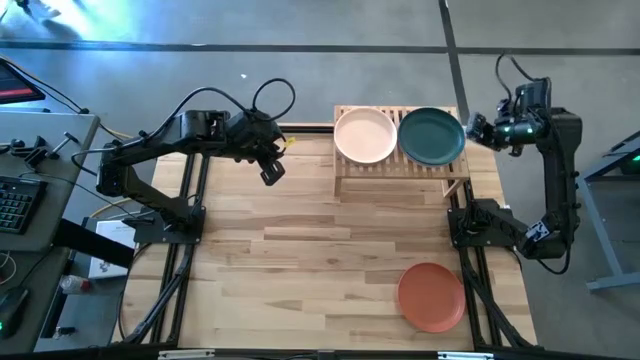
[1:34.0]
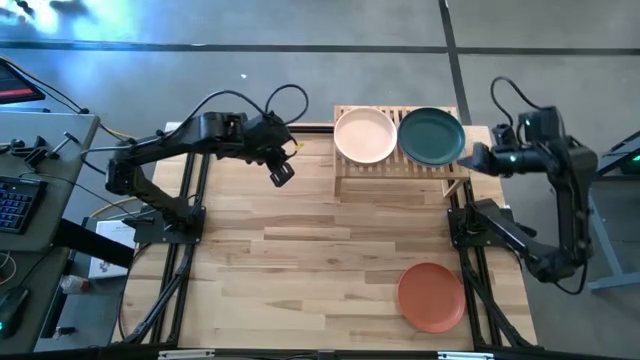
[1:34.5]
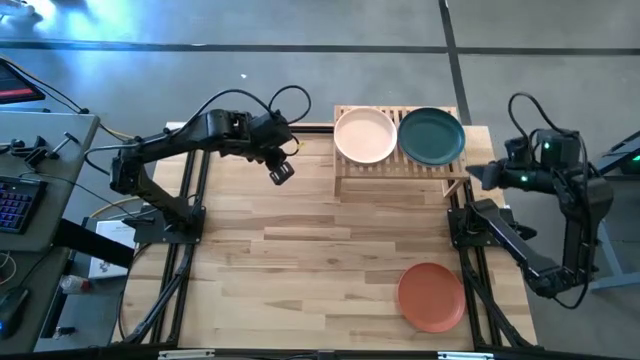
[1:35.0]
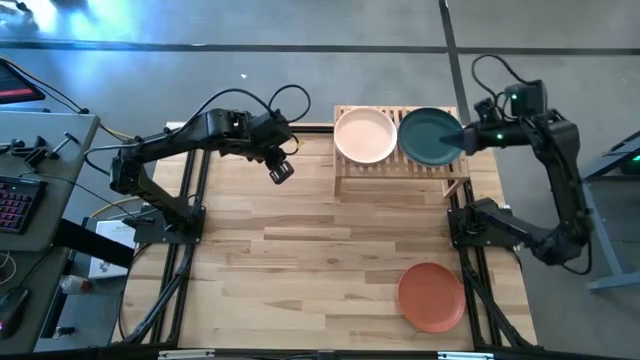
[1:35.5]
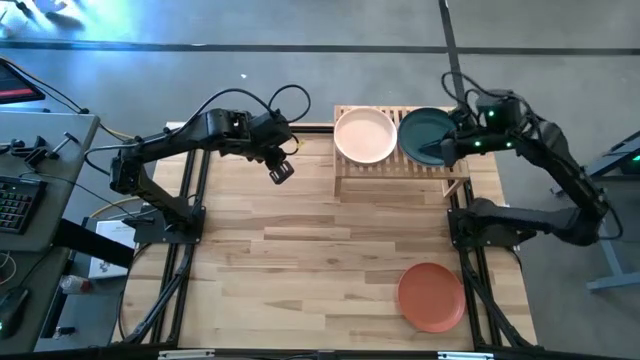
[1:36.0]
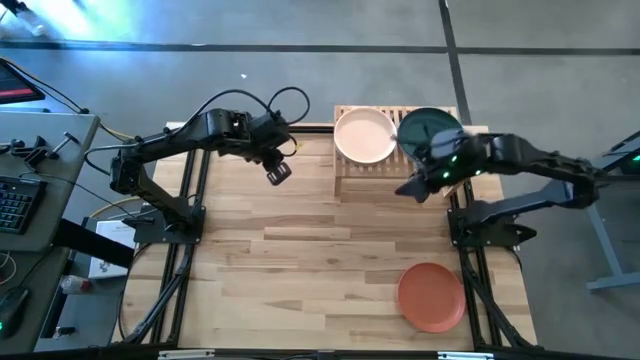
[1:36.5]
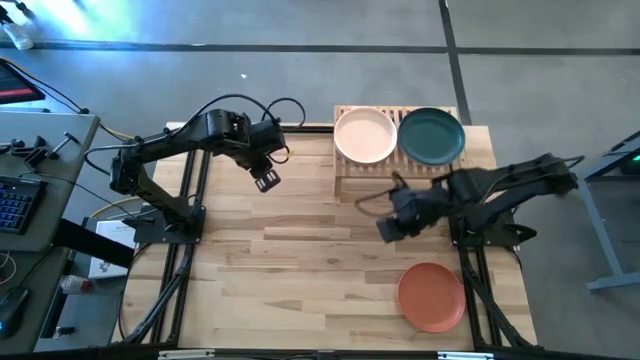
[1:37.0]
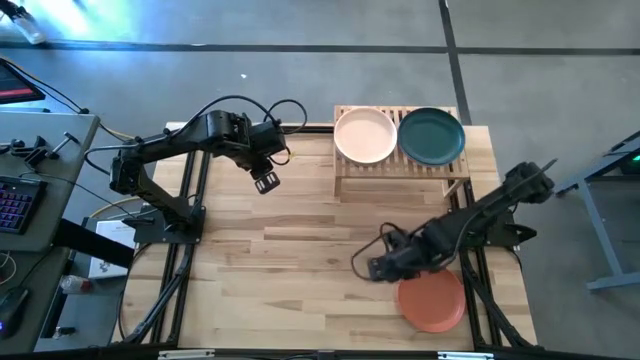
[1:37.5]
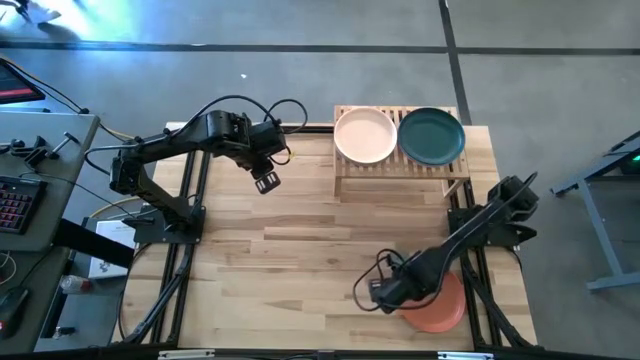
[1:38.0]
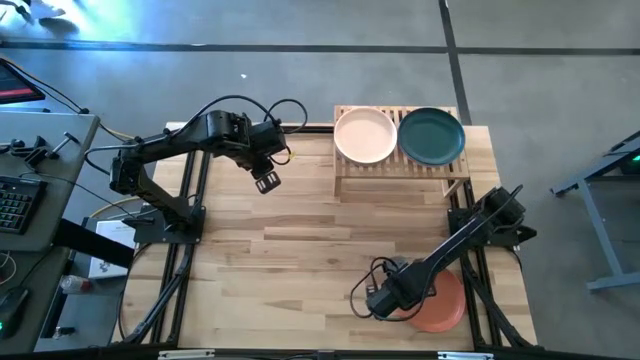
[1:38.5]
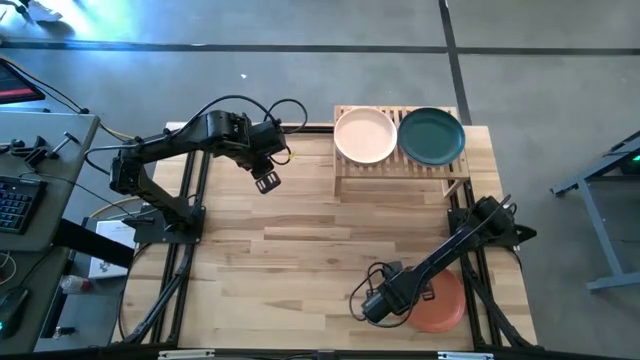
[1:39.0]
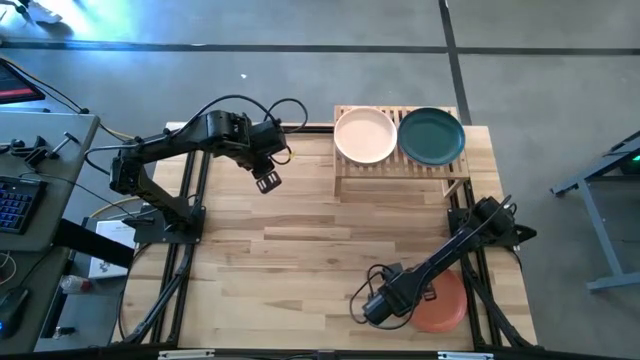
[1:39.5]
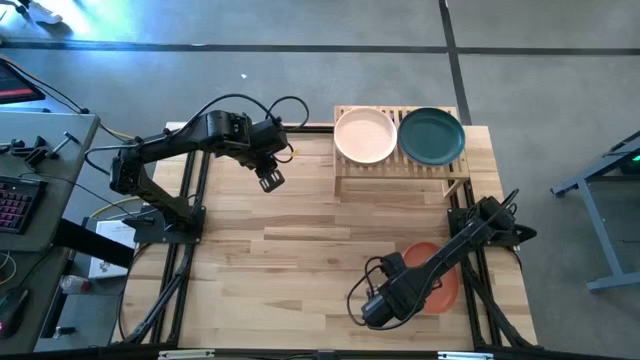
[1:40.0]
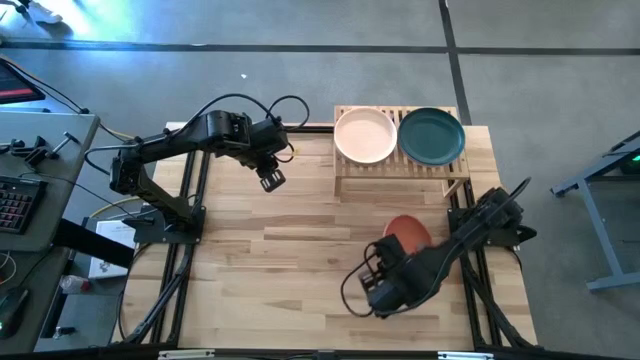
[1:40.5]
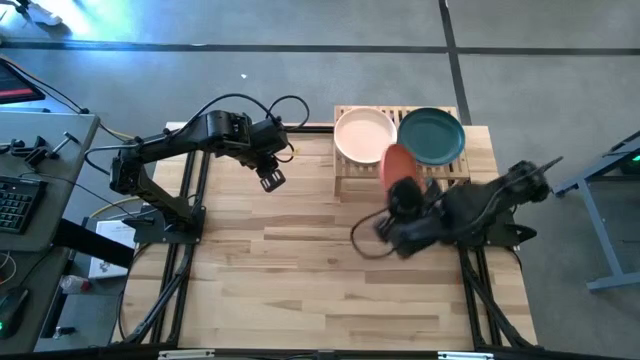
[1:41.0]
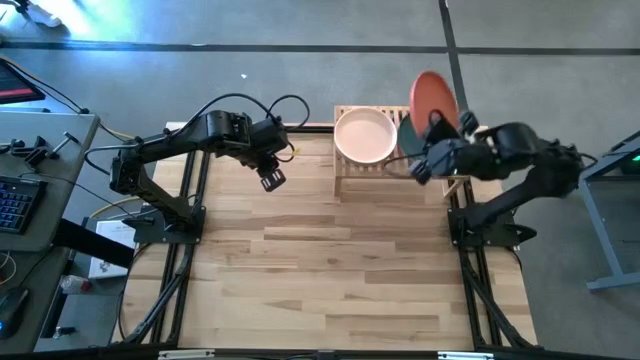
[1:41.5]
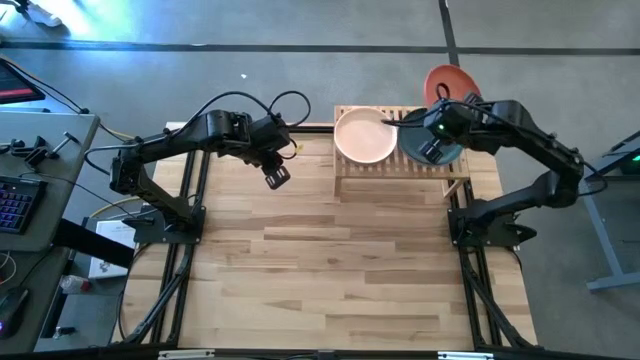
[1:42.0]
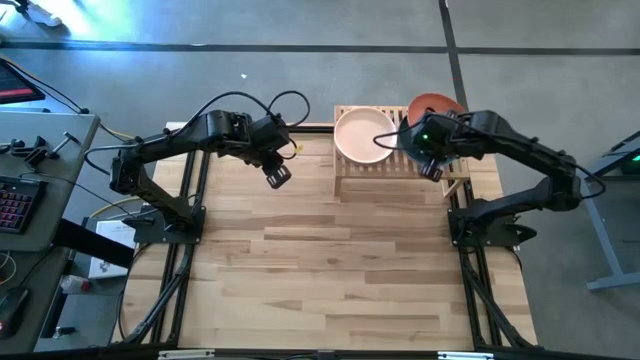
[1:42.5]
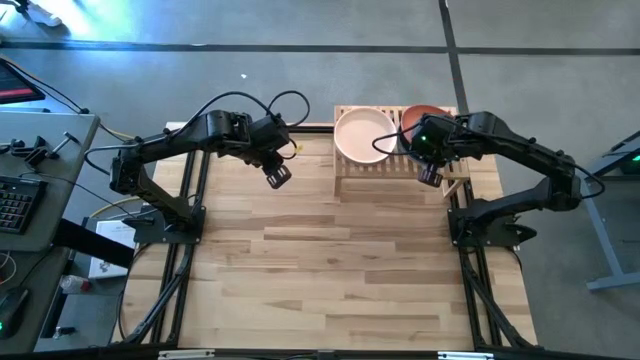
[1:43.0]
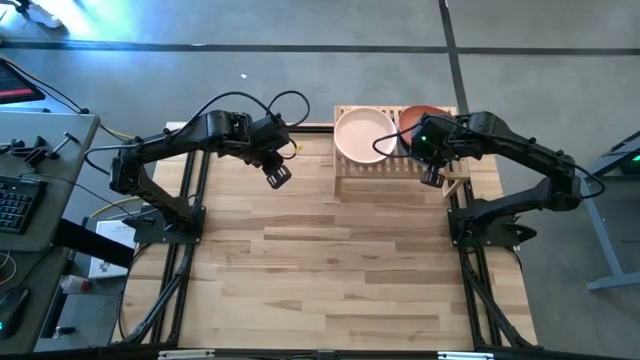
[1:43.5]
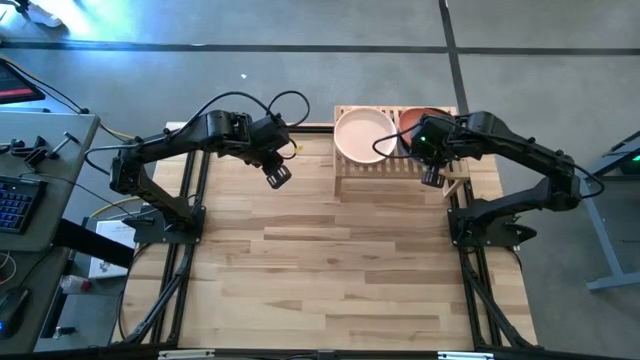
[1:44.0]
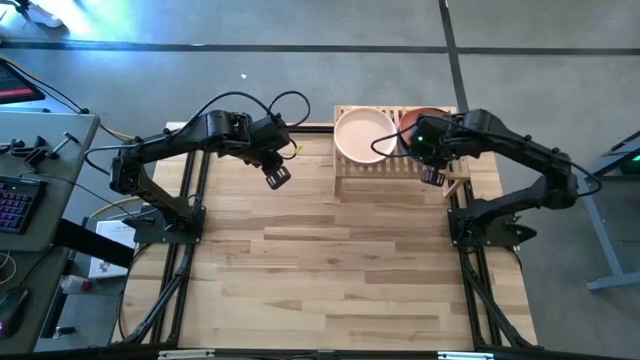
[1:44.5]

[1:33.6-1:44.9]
Task: Place and stack plates onto a shelf
Stack the orange plate on top of the green plate on the shelf

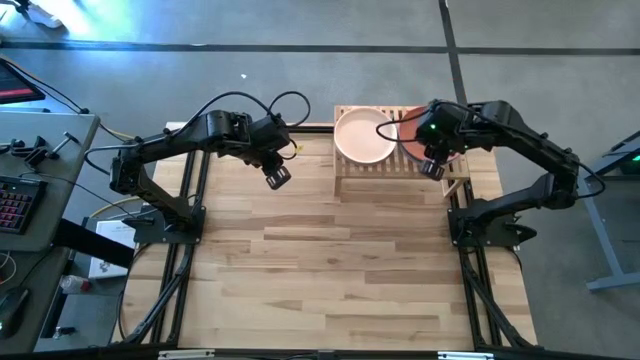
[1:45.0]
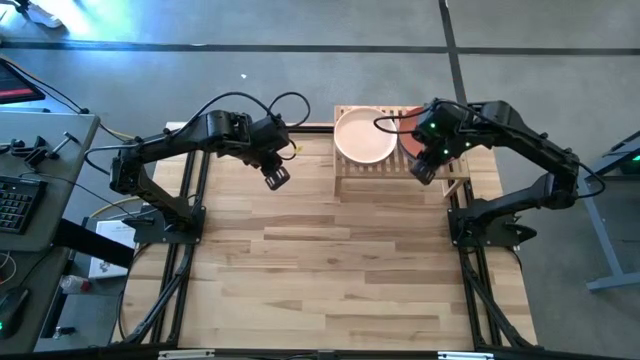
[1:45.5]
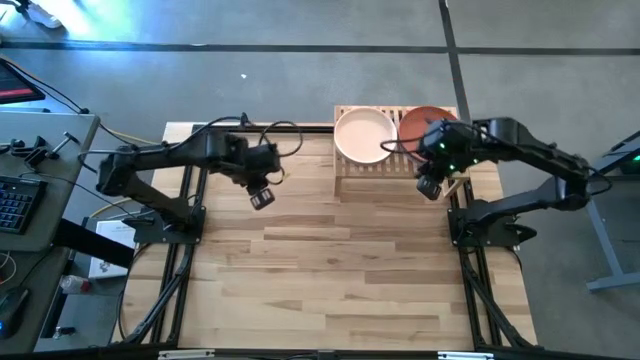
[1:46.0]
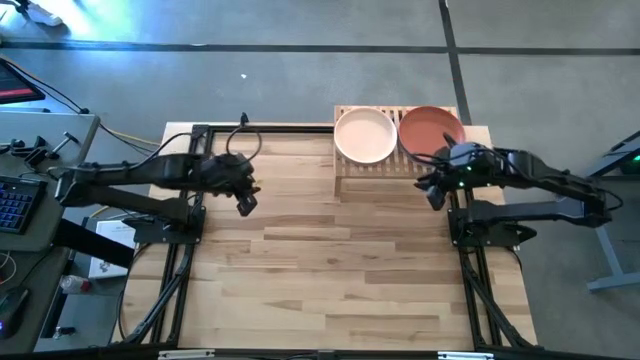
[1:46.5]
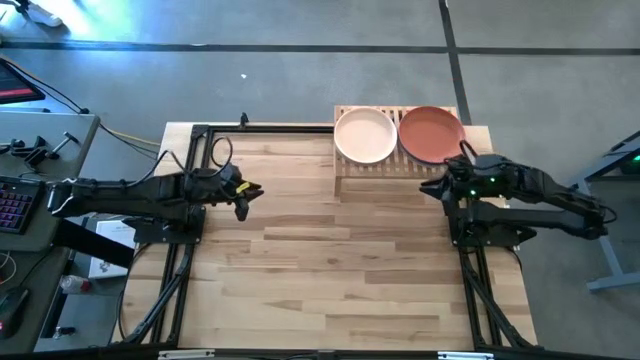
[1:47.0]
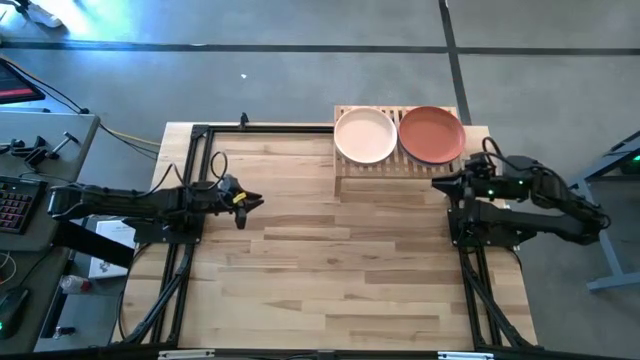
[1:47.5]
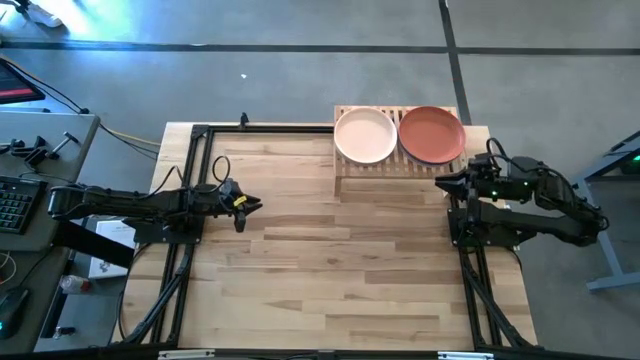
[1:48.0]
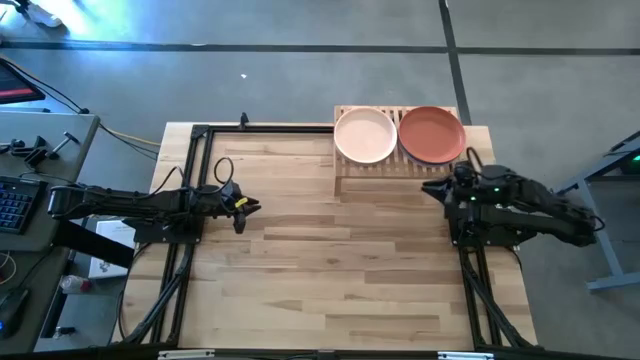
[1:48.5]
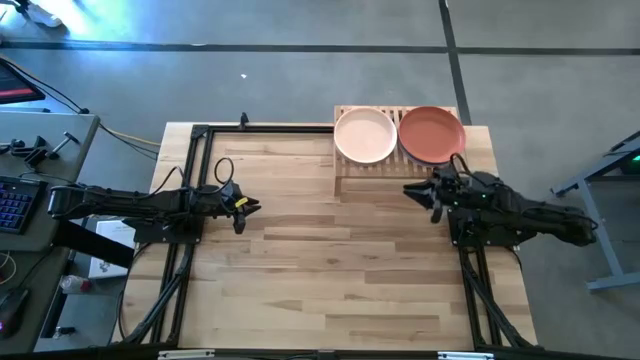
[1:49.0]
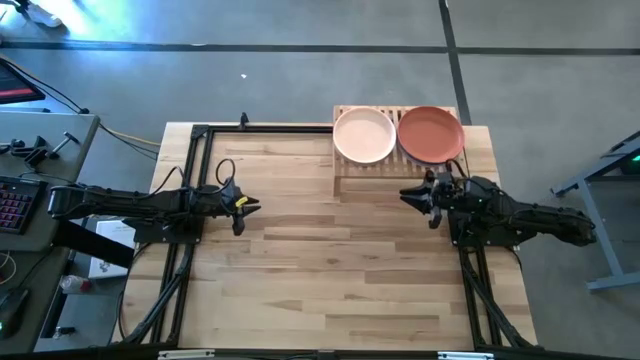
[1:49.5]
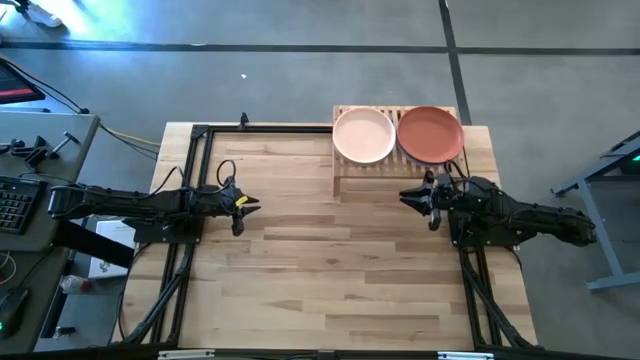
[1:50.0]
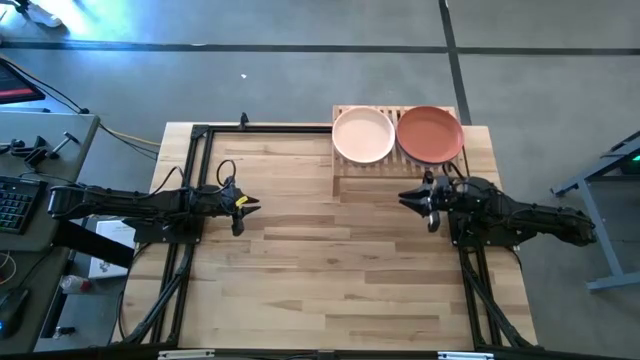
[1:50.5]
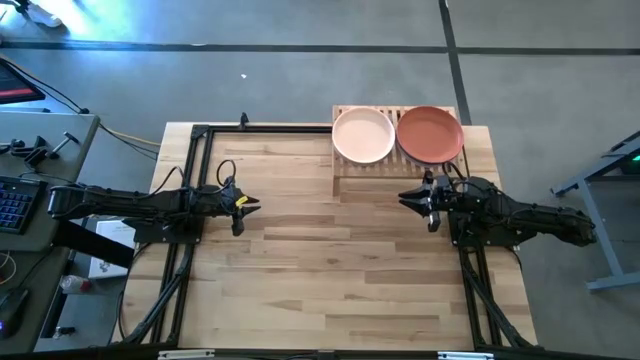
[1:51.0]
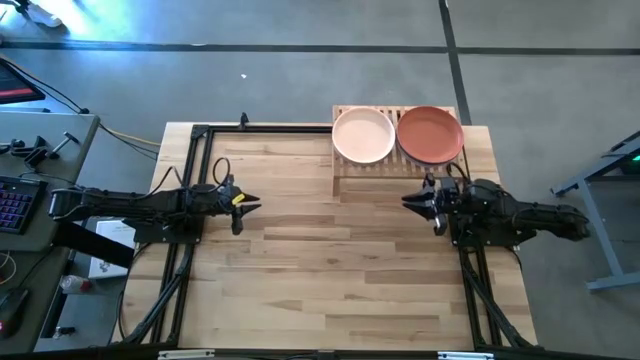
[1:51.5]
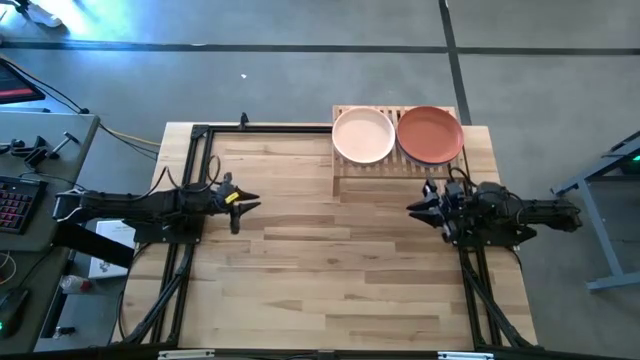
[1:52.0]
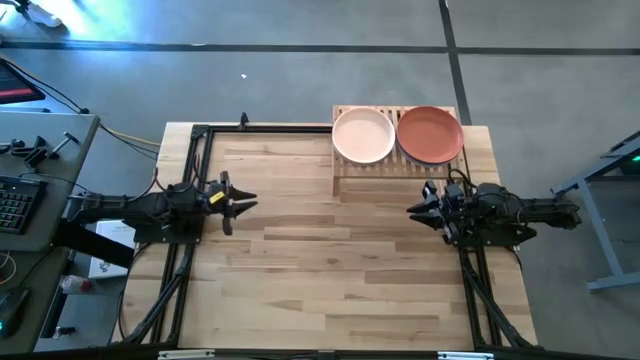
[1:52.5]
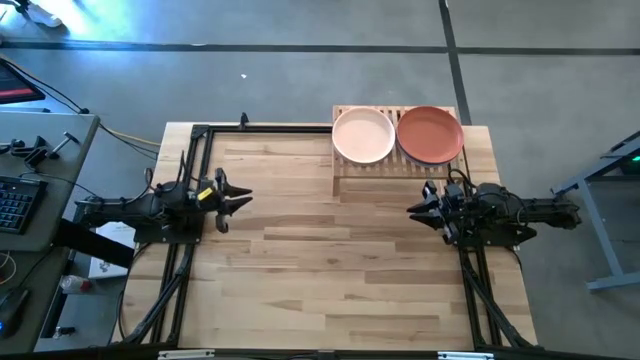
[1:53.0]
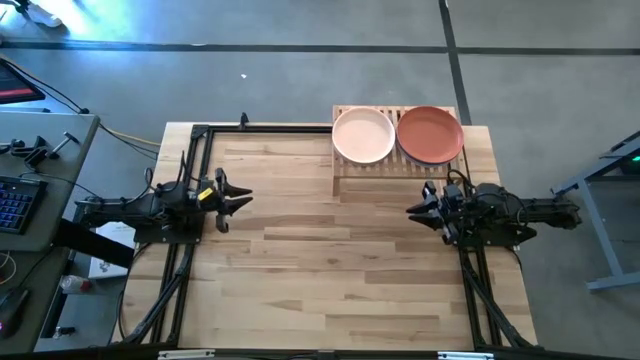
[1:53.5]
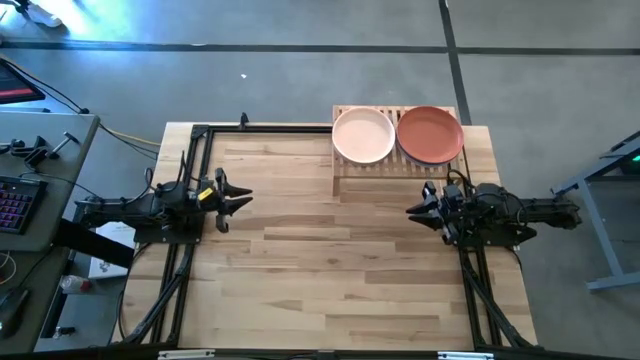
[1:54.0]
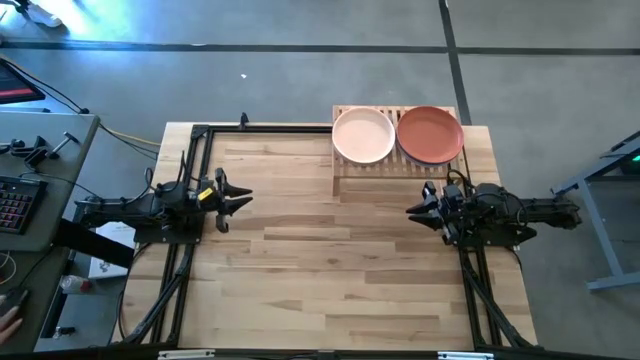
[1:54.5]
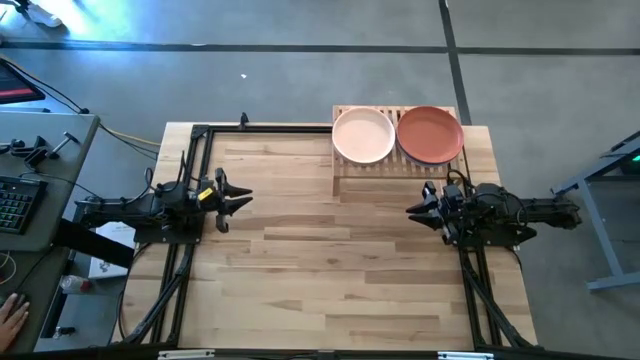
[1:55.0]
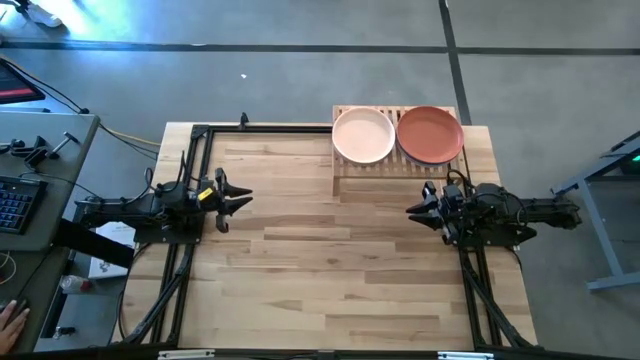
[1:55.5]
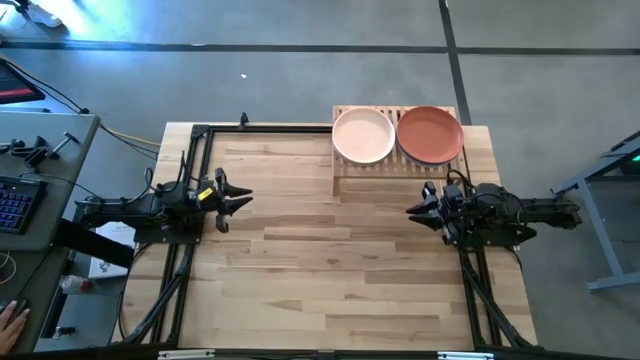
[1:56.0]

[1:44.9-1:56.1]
Return to Home Position
